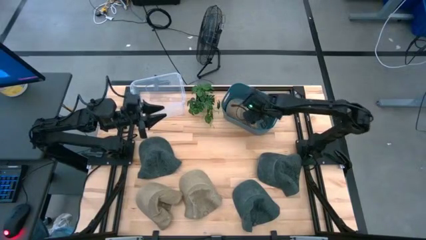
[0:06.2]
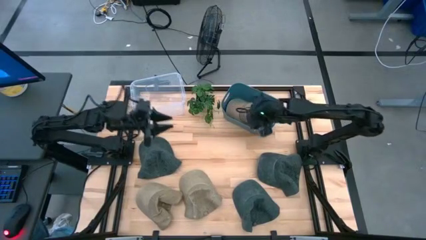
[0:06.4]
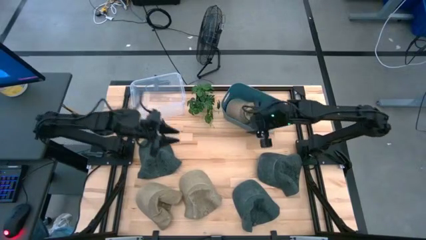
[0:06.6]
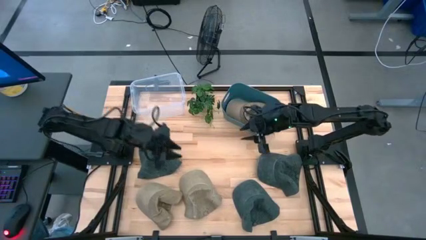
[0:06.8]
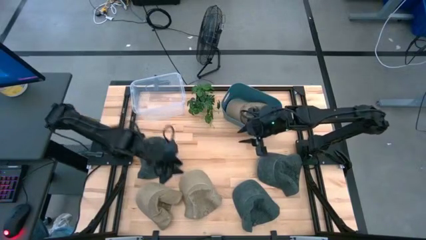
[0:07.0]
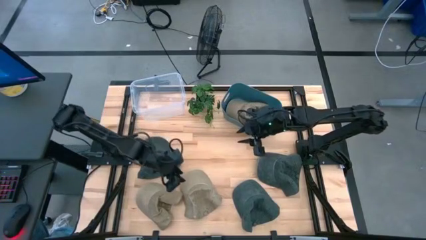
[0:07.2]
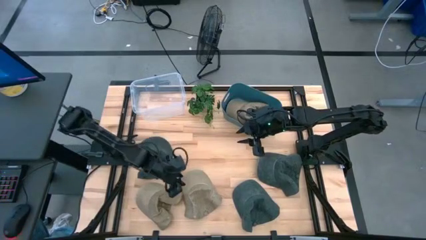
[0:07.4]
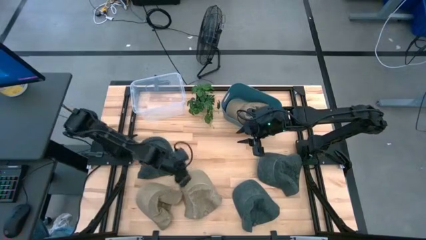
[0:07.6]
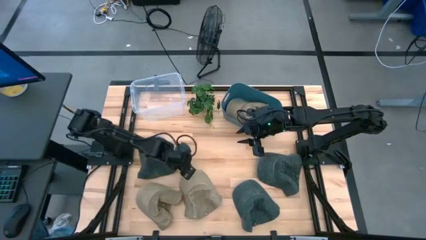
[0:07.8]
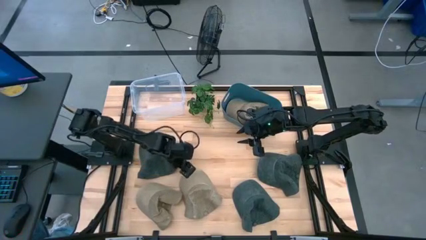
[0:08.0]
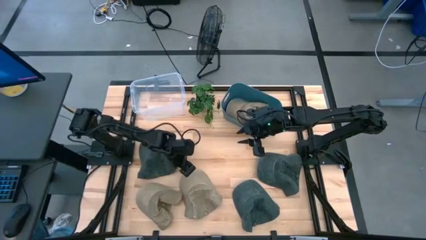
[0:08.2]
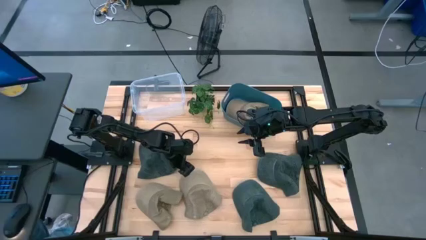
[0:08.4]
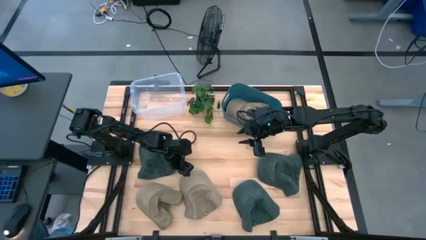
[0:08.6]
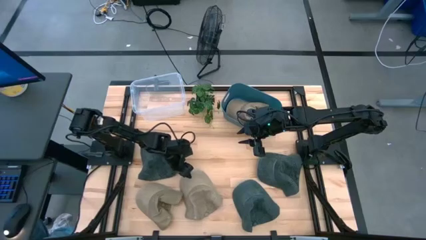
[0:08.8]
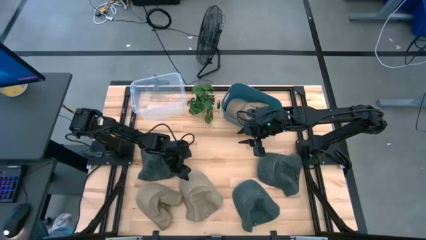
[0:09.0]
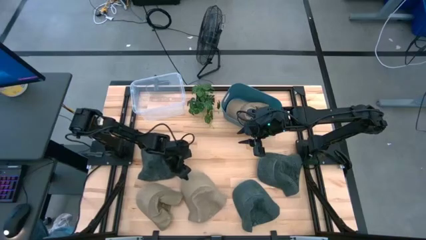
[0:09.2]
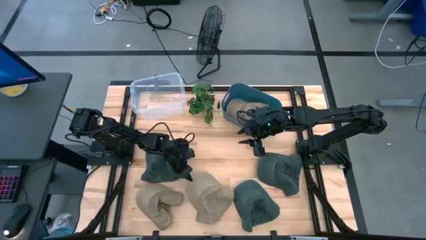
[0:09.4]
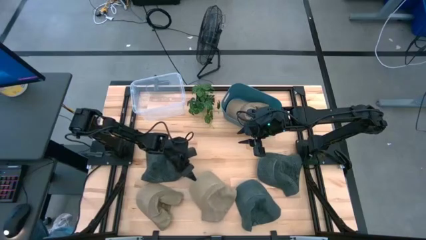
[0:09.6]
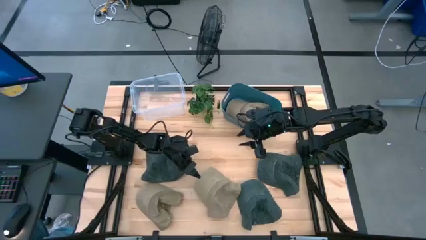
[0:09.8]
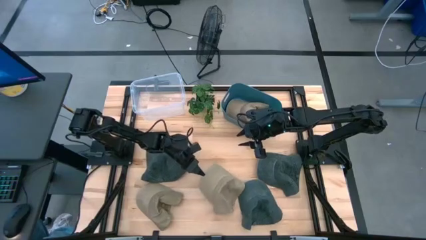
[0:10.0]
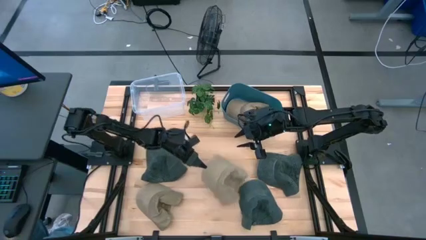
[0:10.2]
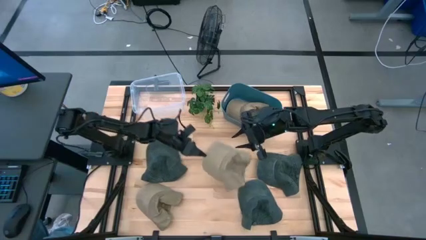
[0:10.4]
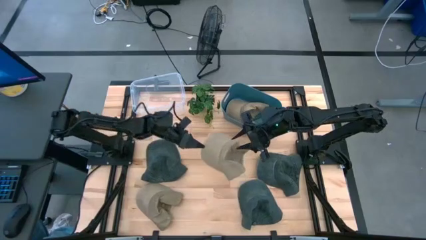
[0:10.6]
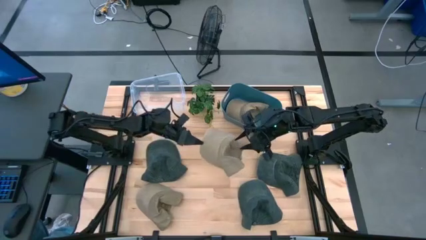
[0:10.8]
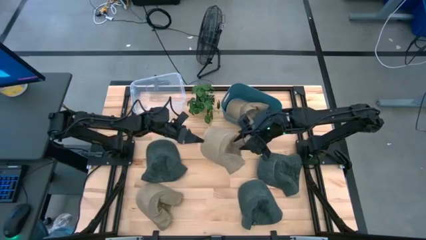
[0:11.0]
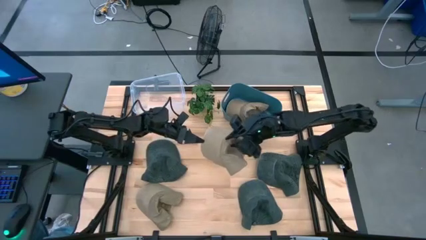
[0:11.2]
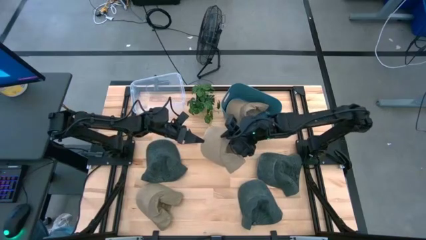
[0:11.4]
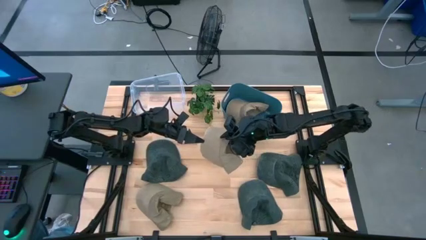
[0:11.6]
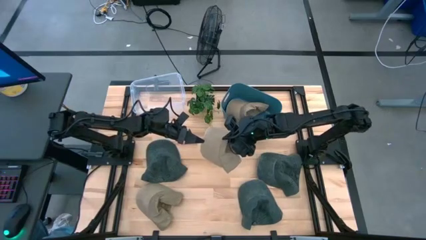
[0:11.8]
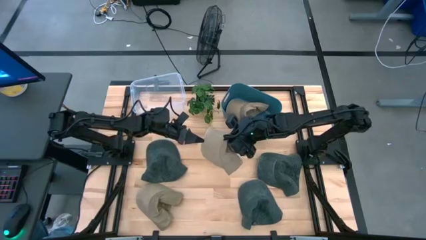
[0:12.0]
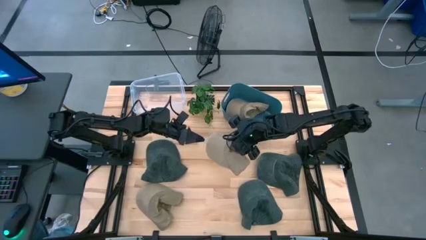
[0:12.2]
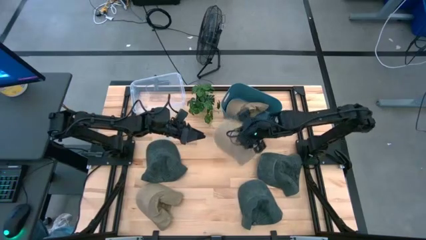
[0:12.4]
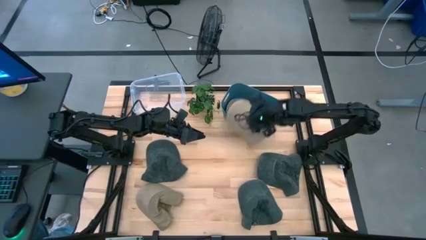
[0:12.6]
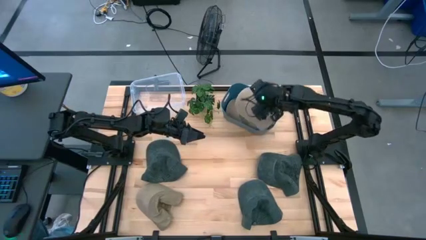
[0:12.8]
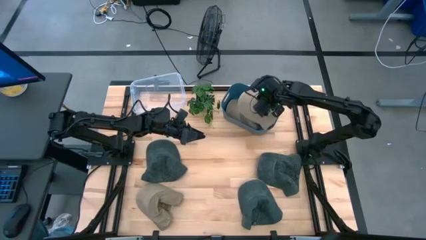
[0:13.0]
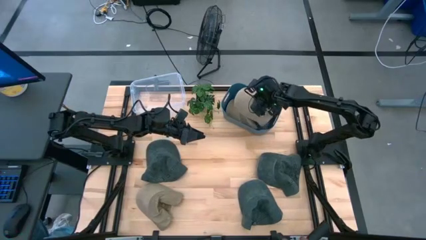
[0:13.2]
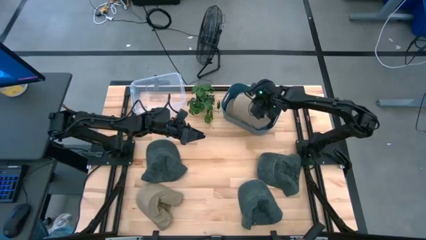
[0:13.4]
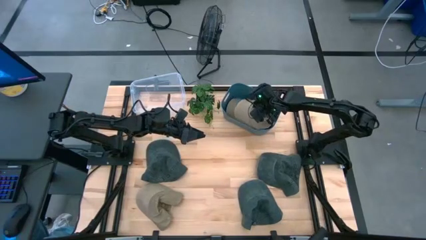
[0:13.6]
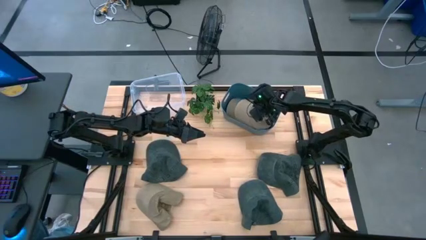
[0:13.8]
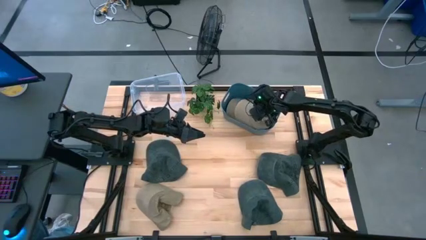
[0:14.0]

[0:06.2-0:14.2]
Task: Pick & Place hat
Put the bottom middle brown cap into the blue bin

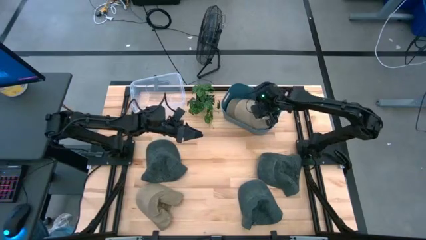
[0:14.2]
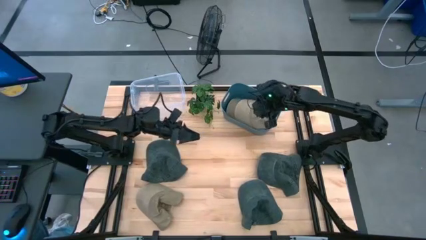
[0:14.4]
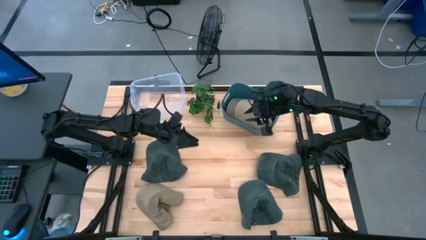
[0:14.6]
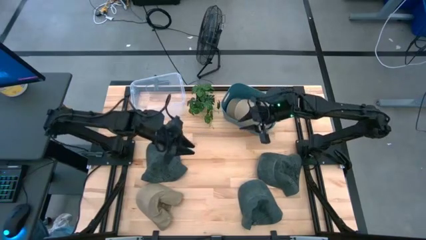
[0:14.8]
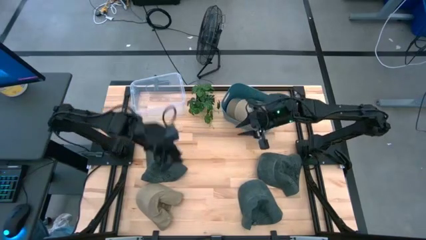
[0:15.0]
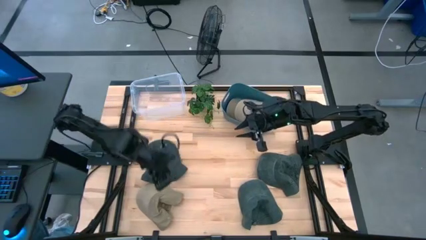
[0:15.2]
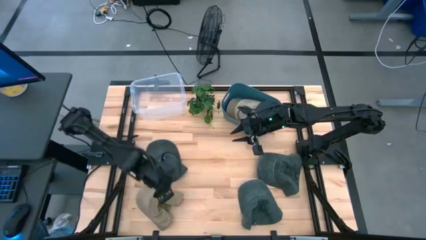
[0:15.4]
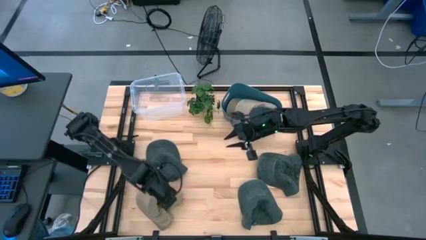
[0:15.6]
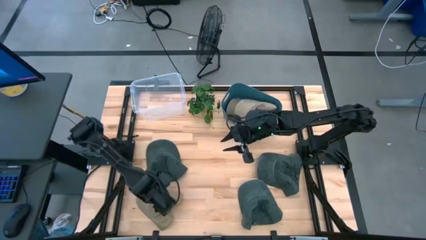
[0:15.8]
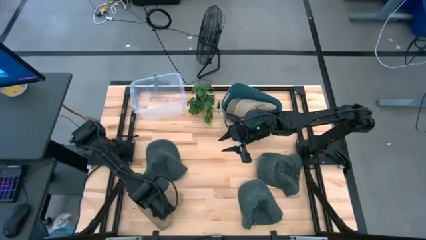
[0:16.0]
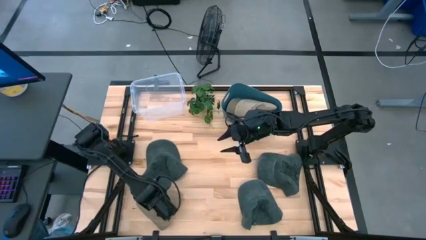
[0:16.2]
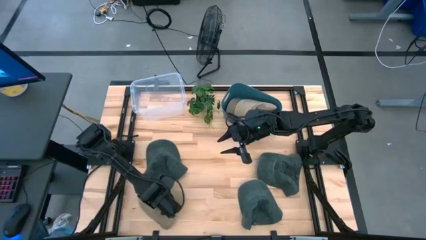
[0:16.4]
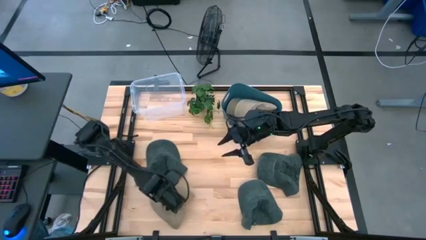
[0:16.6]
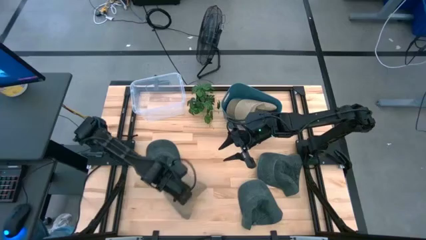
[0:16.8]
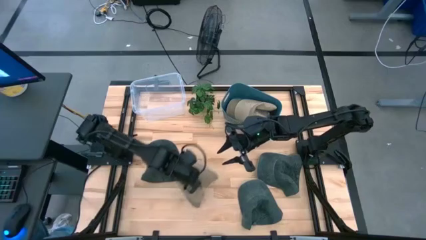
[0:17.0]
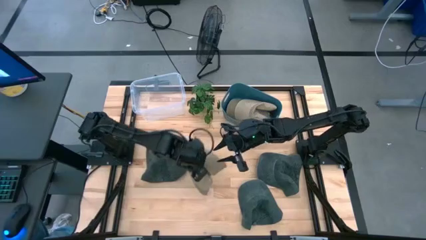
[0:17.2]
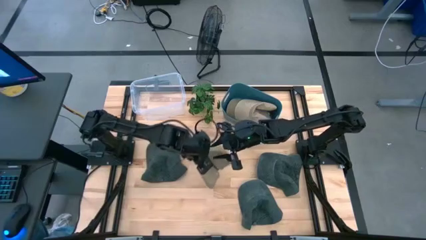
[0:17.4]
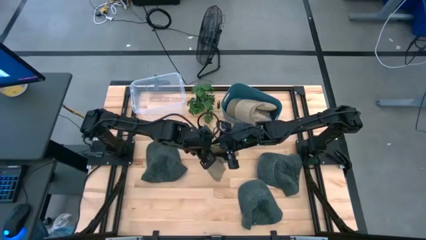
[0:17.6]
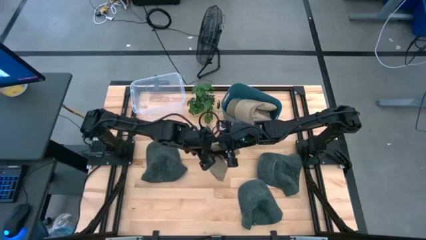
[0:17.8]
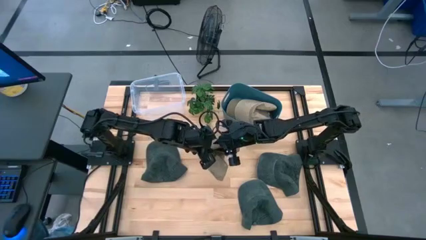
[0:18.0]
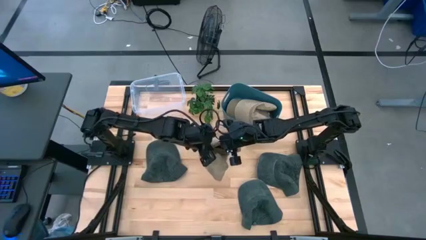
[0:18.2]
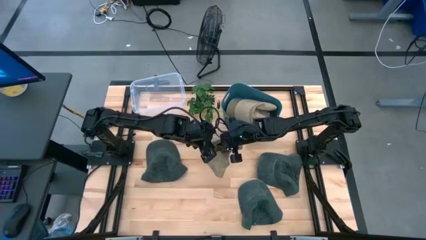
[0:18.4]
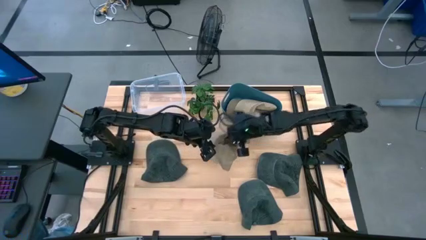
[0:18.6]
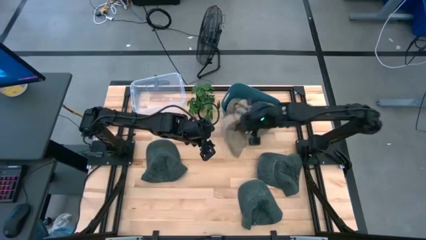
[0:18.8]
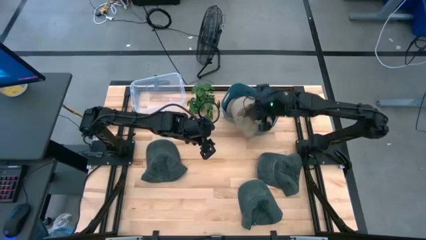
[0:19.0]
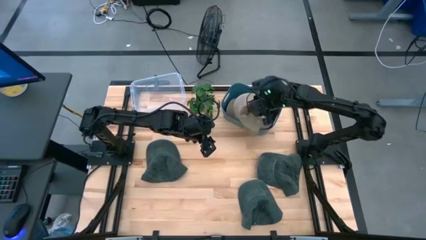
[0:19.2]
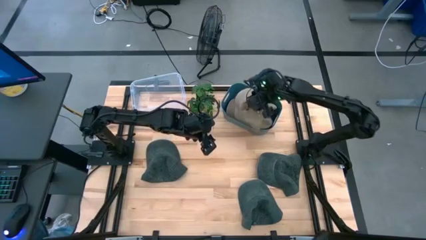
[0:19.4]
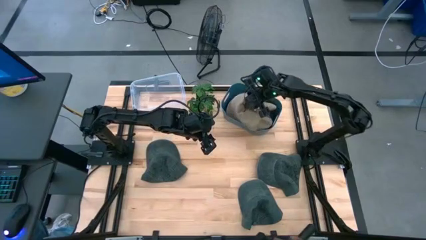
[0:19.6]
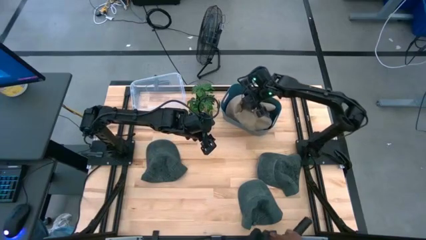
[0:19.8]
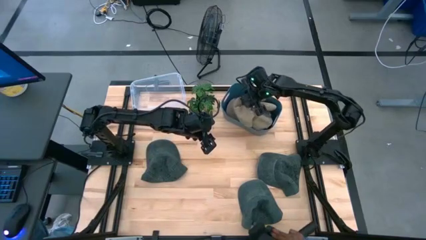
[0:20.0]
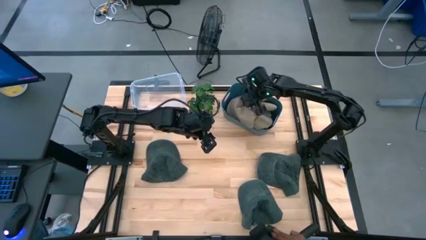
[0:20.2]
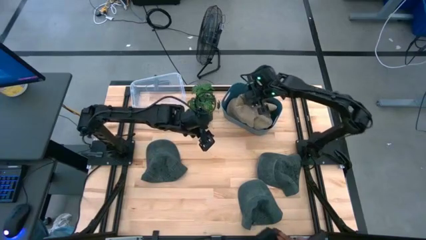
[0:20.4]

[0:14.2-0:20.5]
Put the bottom left brown cap into the blue bin

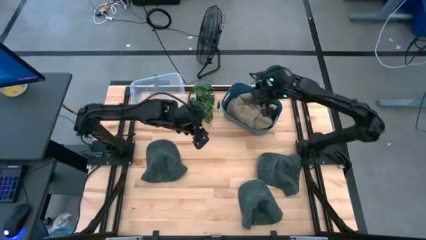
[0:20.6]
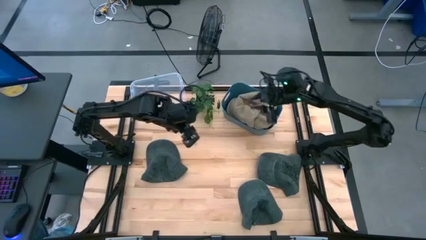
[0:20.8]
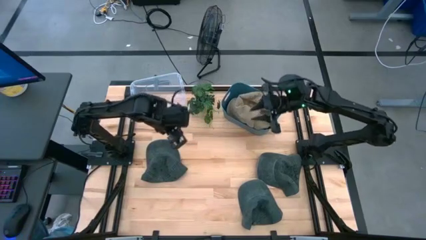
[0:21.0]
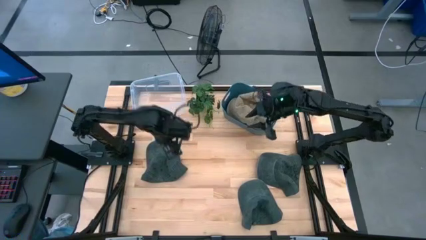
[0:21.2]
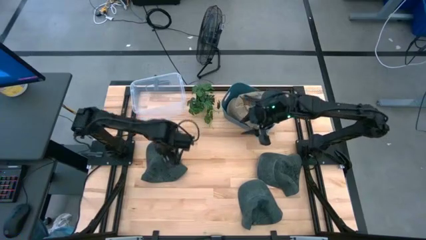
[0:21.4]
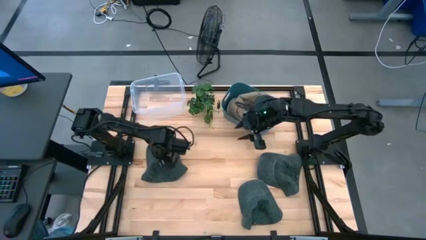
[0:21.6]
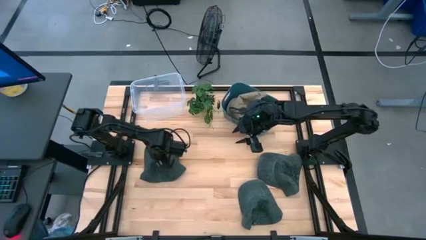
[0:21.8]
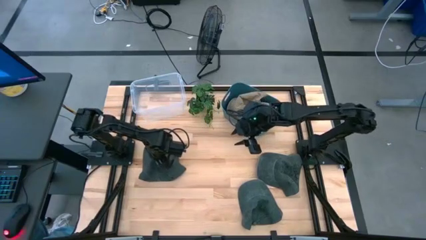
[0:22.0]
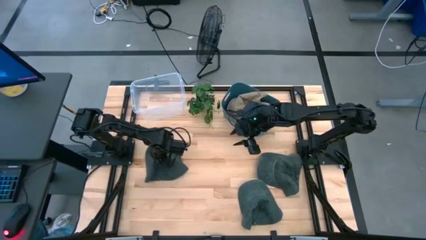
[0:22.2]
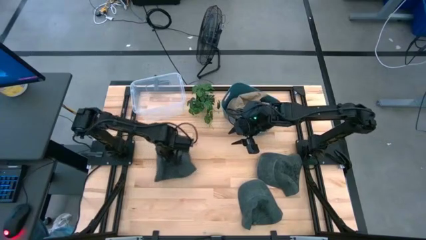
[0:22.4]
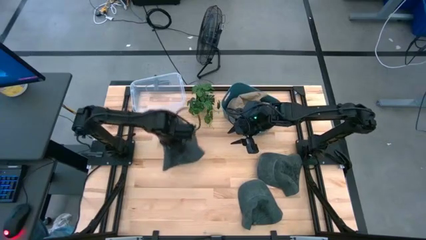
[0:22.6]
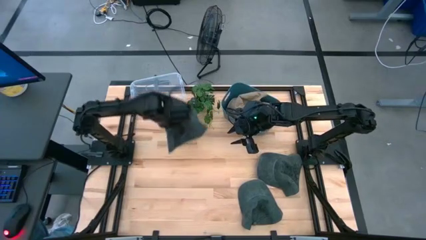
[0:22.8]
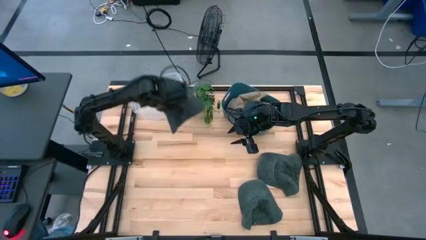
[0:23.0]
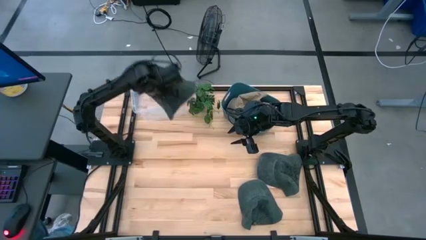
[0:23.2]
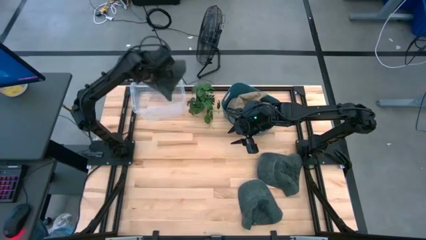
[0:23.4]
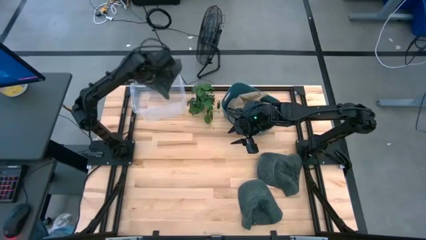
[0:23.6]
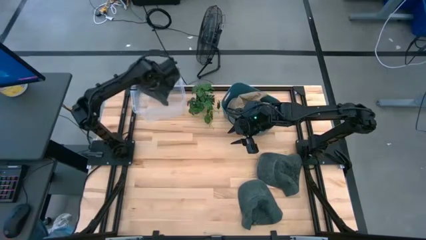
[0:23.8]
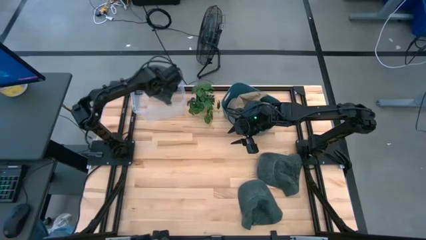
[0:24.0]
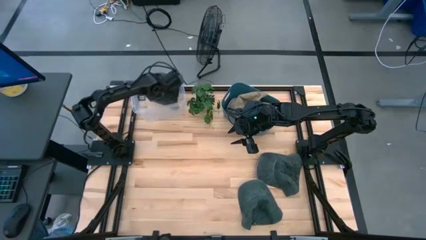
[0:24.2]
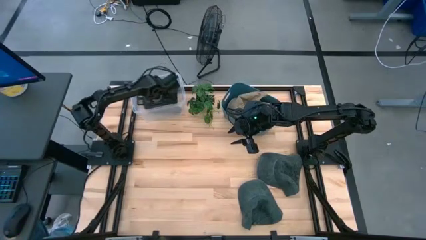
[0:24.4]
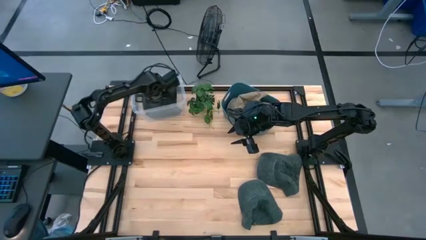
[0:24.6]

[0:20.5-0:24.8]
Put the middle left gray cap into the transparent bin
